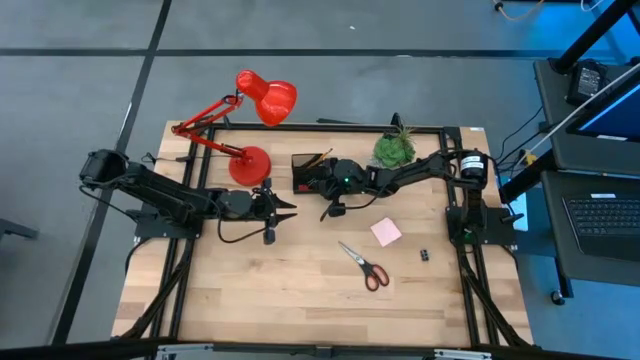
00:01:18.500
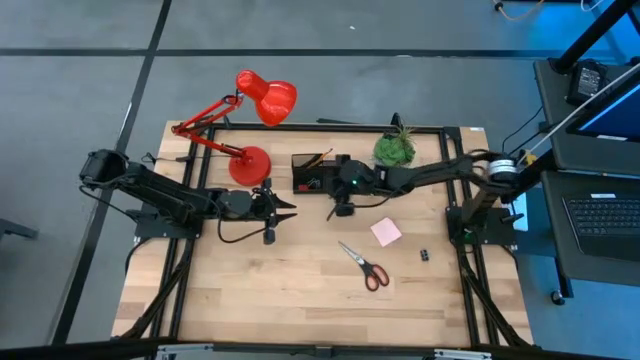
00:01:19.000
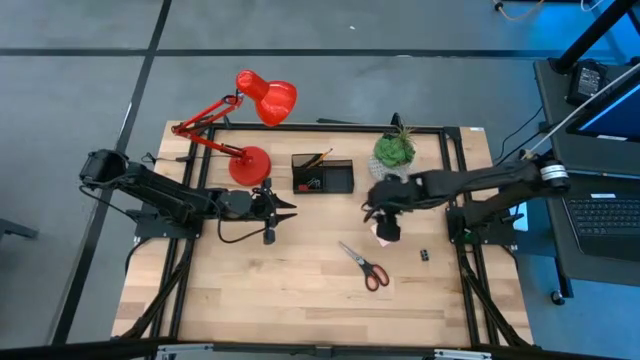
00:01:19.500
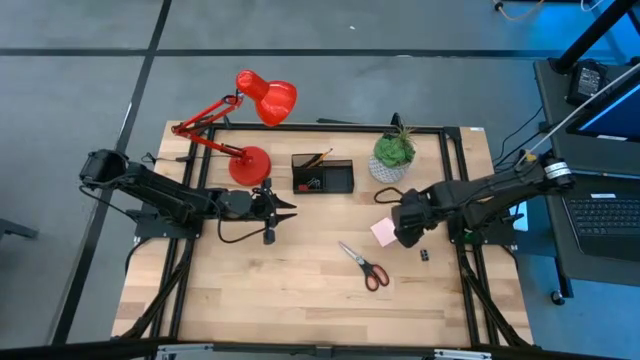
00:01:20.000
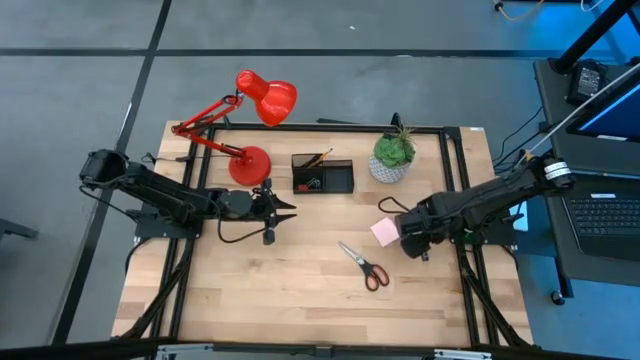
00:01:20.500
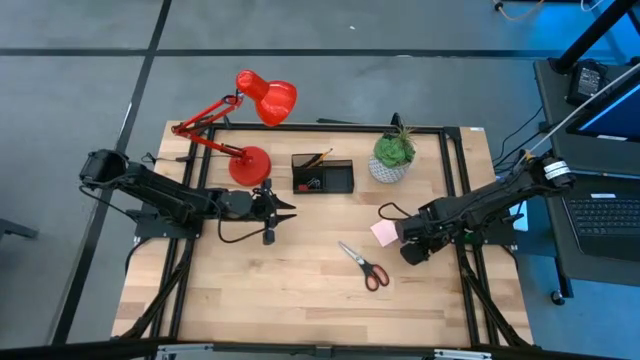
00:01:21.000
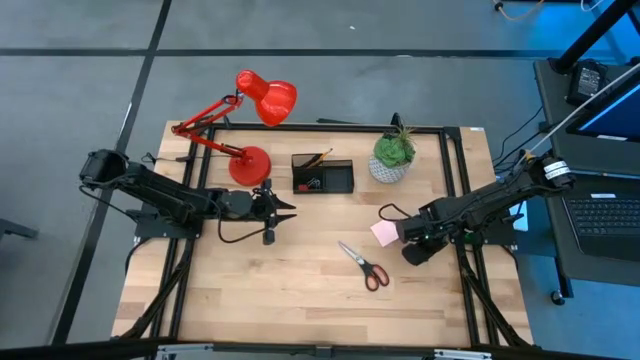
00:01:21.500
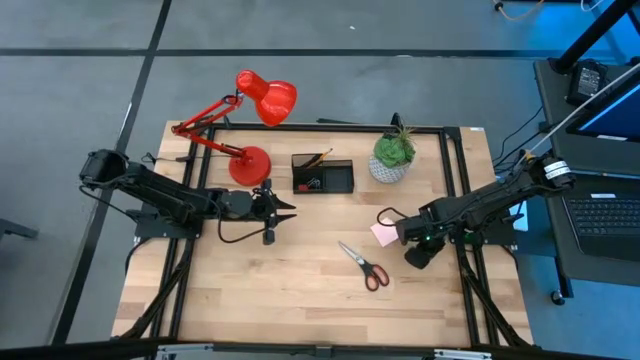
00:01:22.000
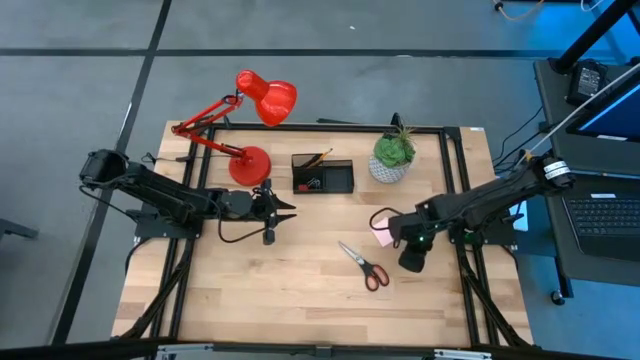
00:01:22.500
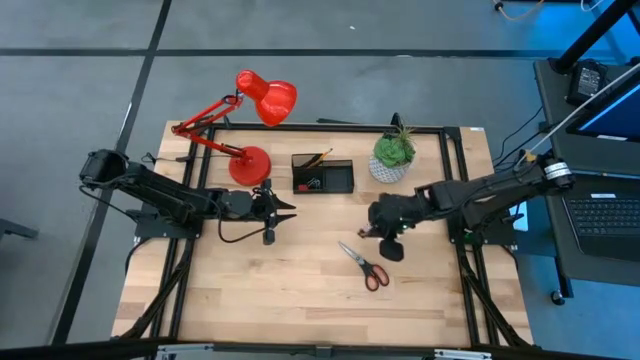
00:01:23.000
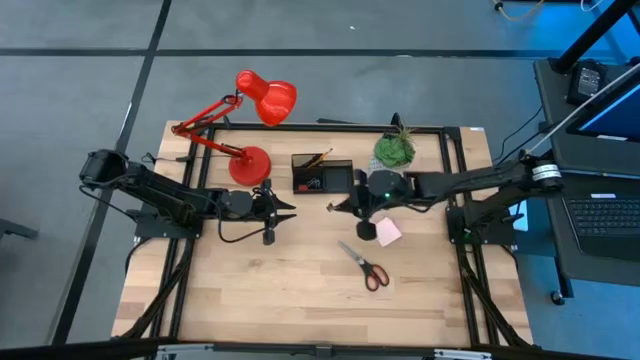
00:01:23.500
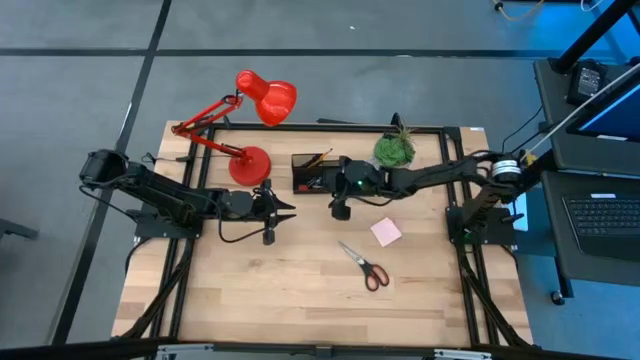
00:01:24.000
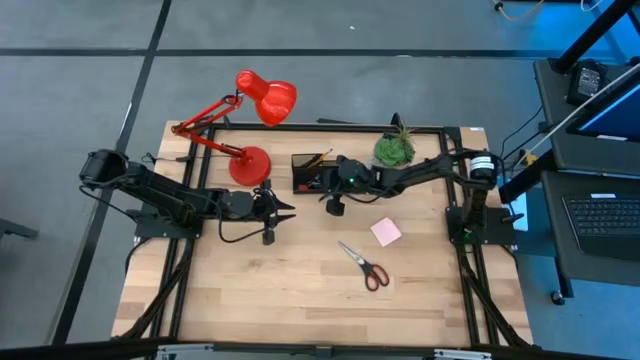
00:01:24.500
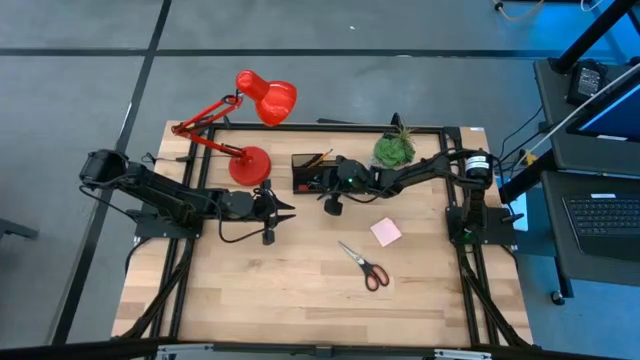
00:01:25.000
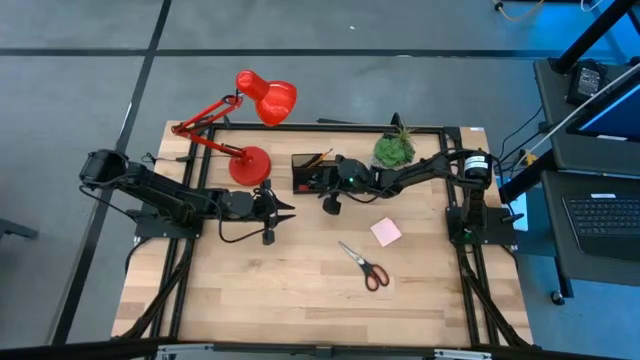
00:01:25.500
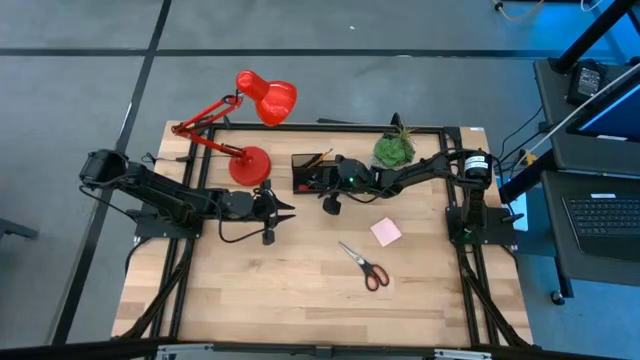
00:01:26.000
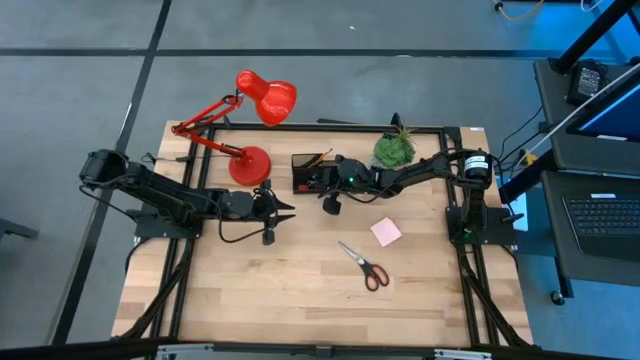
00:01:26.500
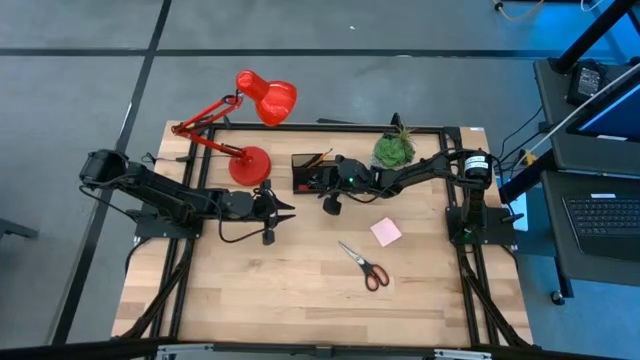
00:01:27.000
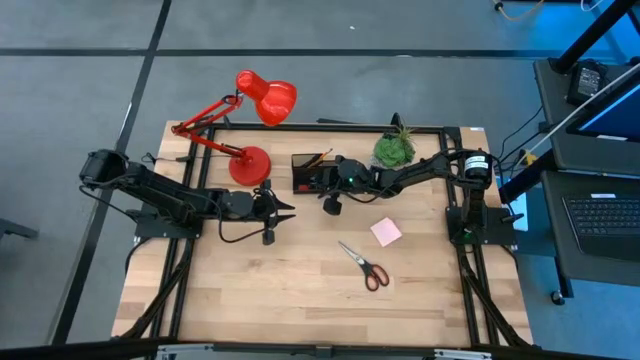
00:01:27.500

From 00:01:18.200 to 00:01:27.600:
Task: Pick and place office supplies into organizer
Put the binder clip into the desk organizer

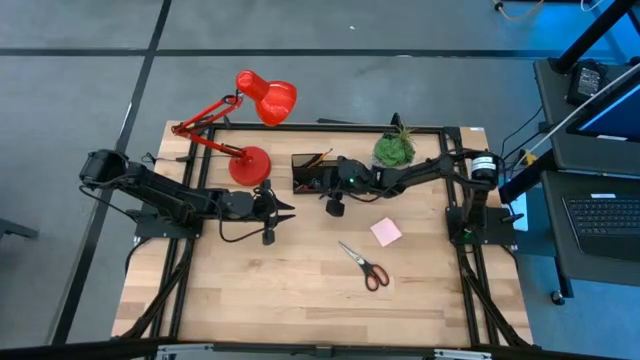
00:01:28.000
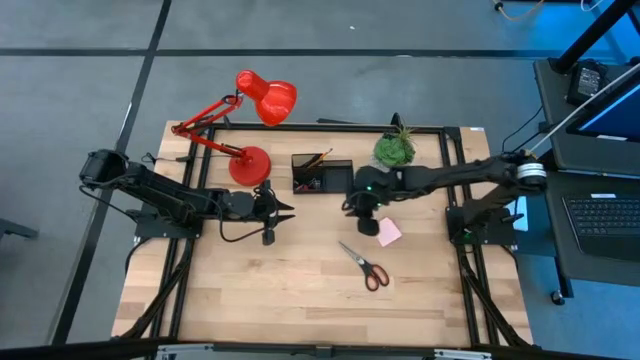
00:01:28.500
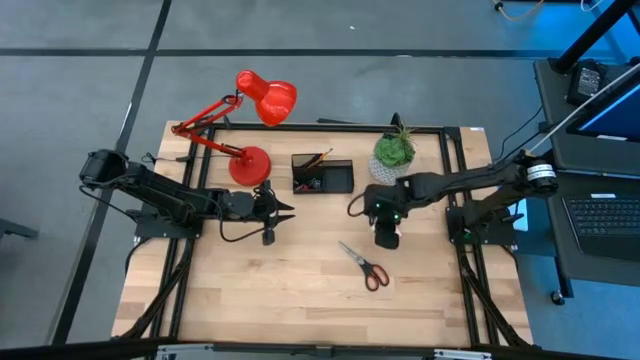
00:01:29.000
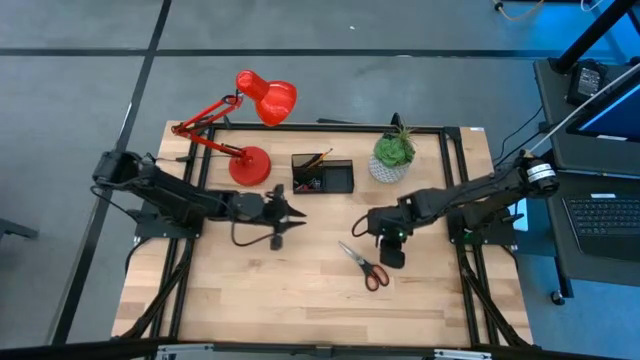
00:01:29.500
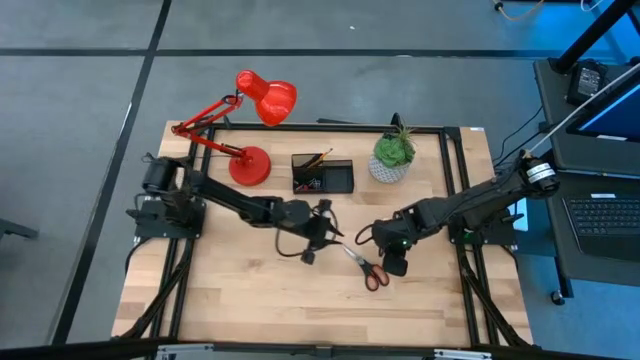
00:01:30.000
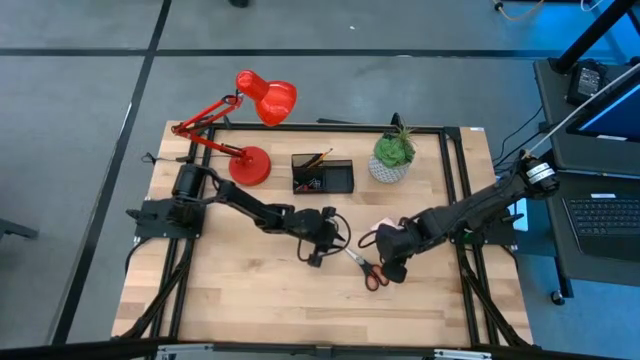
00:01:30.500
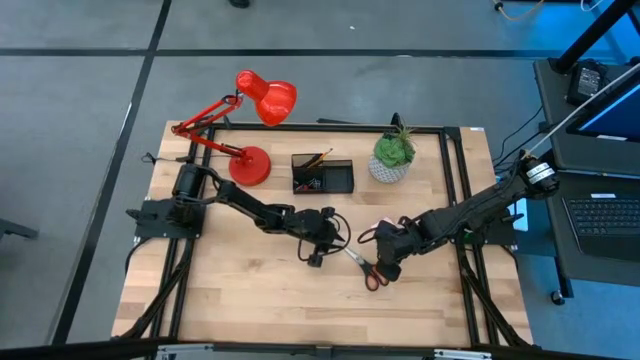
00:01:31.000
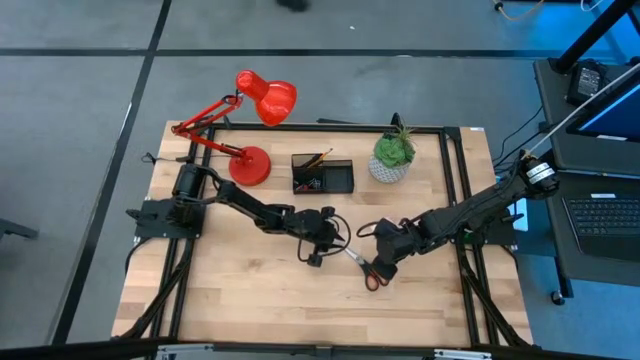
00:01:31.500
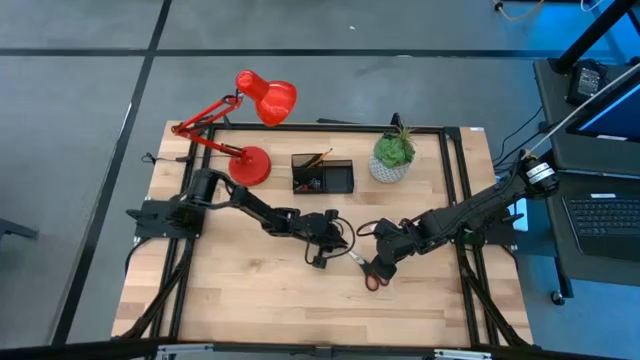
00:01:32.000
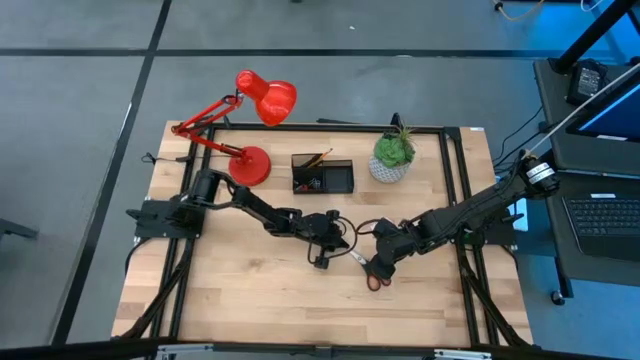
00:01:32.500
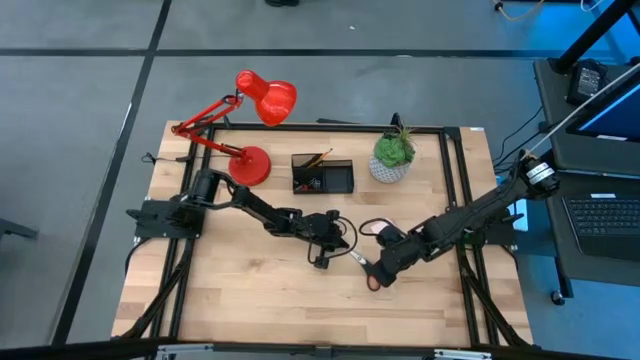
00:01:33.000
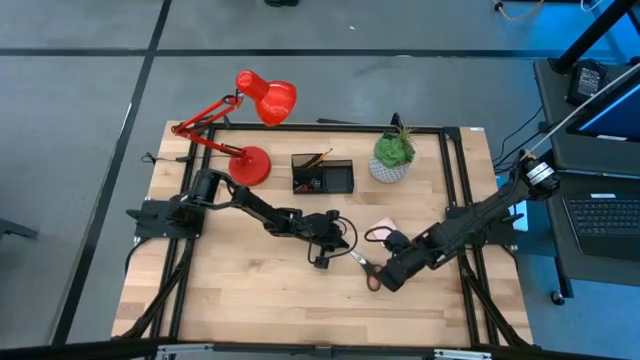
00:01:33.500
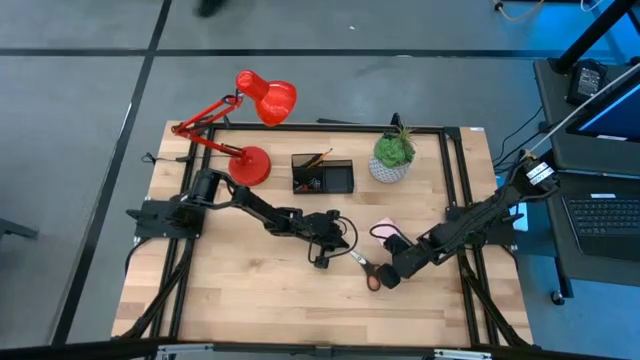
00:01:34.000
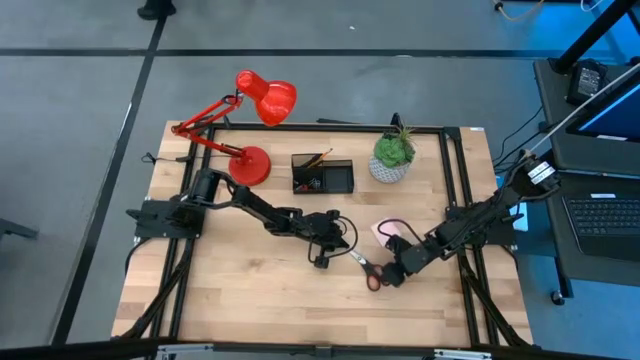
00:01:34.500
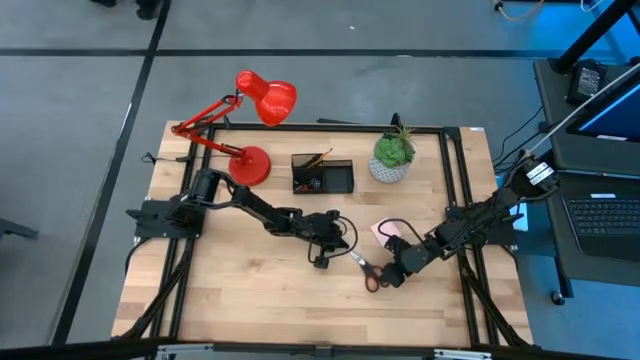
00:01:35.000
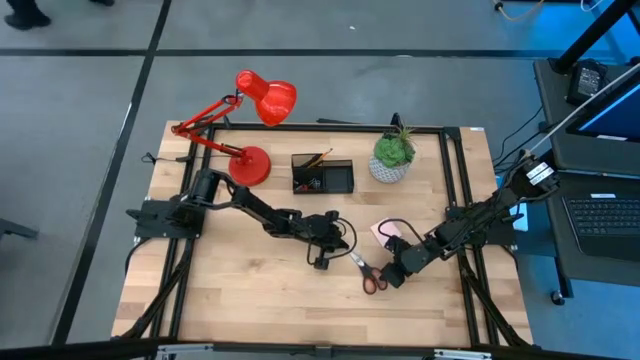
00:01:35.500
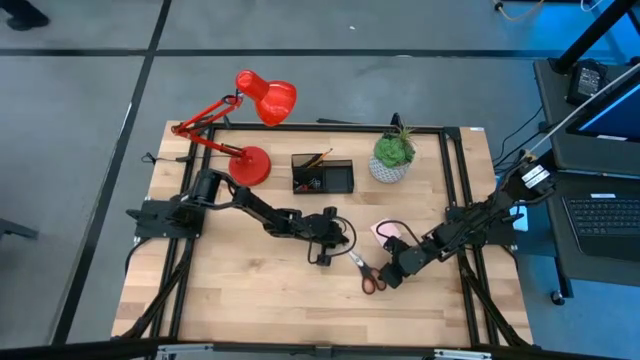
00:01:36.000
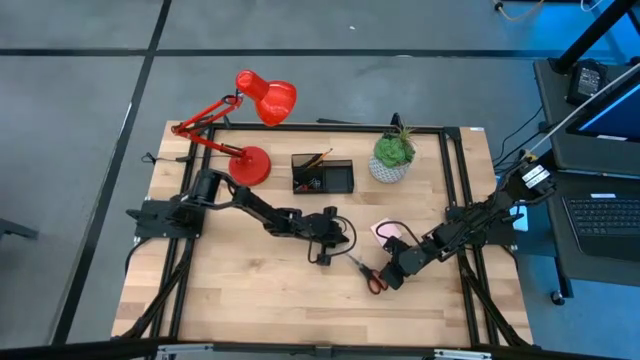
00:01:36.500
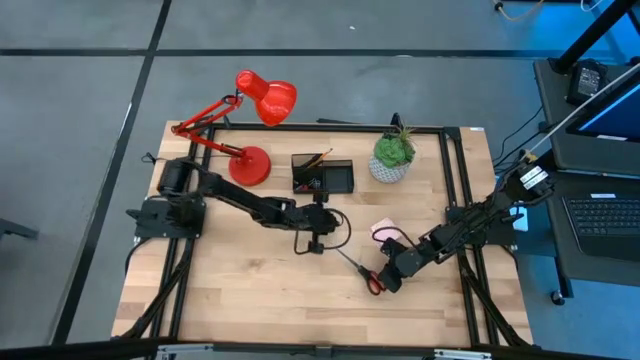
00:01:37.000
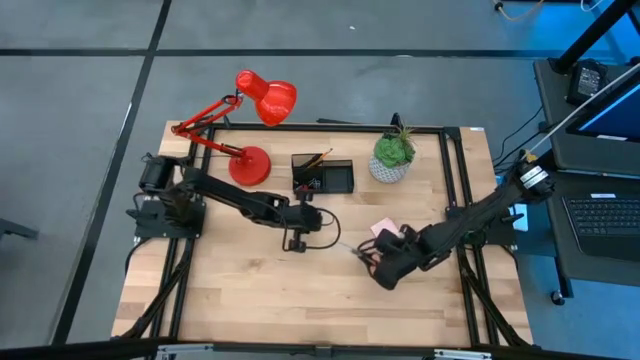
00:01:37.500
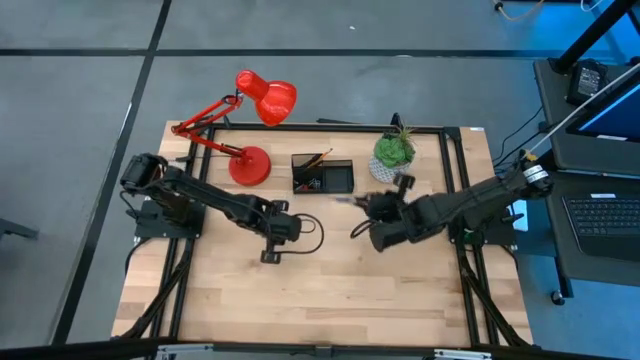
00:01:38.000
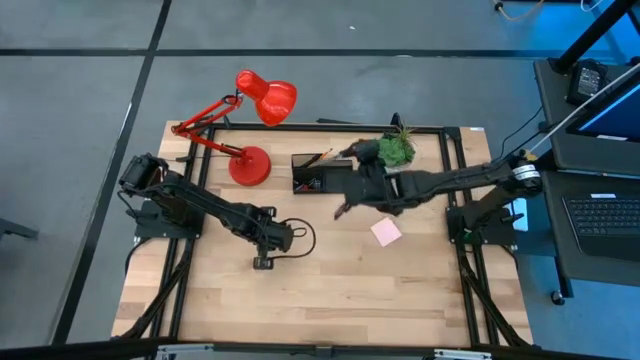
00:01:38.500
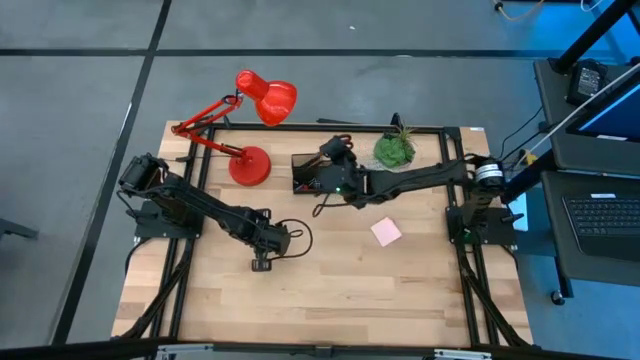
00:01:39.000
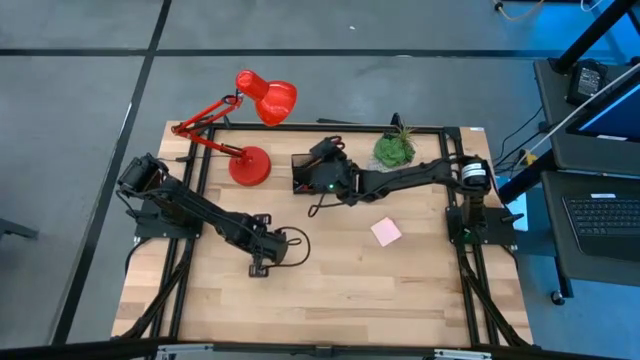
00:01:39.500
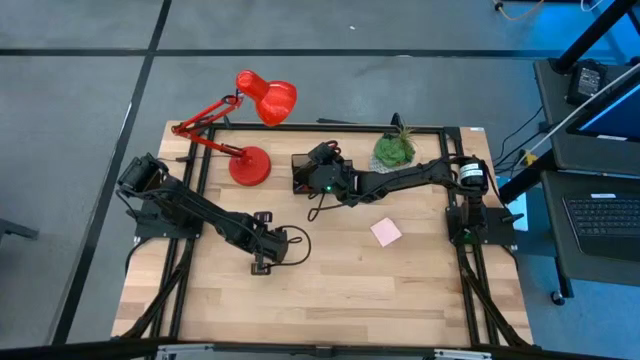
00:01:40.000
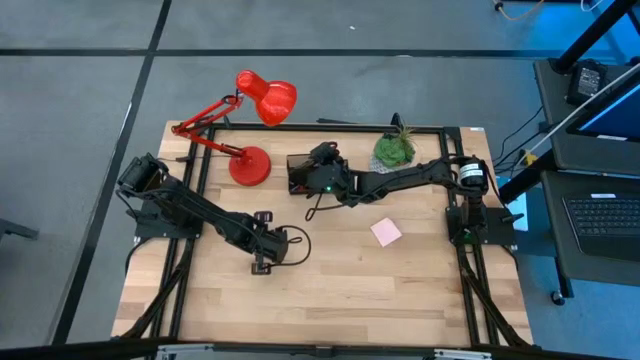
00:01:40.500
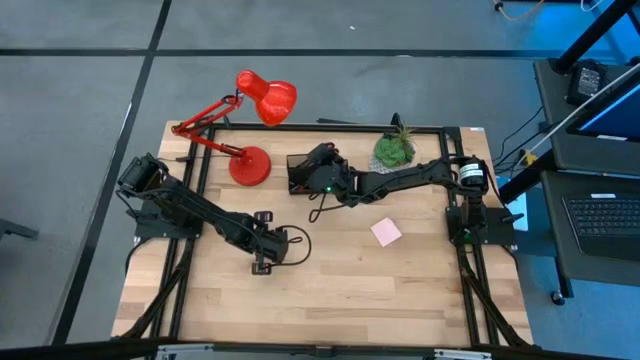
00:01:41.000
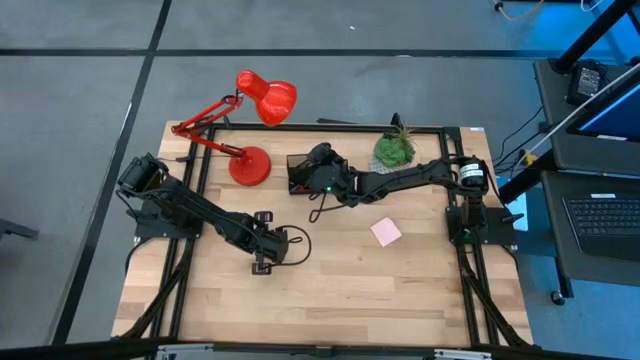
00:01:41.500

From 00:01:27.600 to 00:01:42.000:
Put the scissors into the desk organizer
